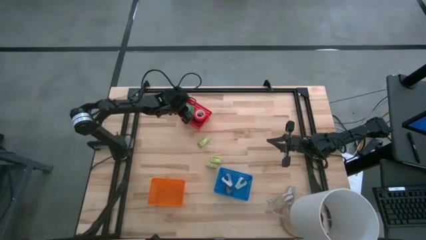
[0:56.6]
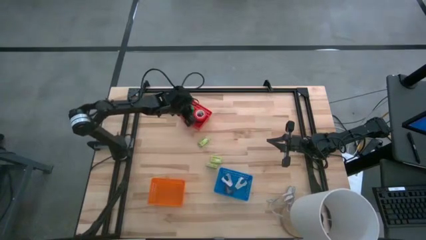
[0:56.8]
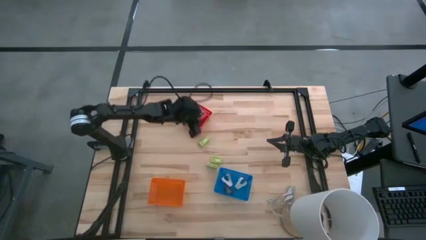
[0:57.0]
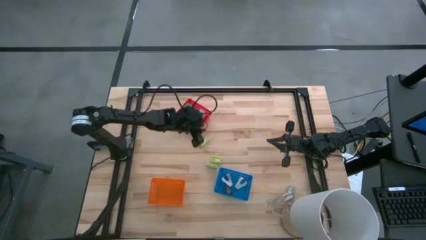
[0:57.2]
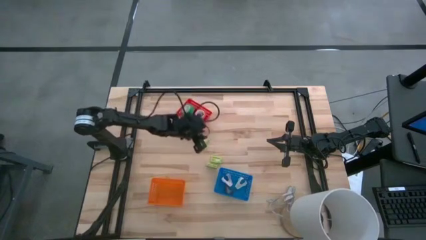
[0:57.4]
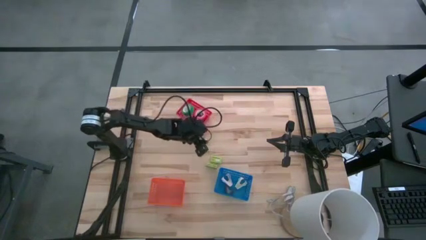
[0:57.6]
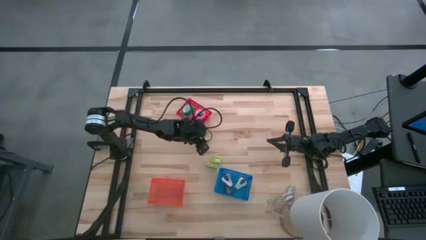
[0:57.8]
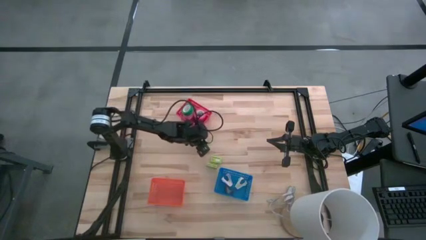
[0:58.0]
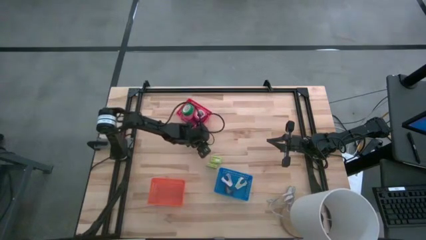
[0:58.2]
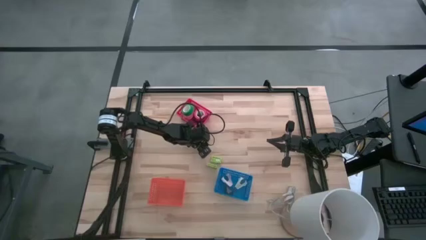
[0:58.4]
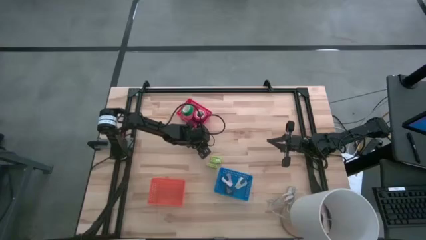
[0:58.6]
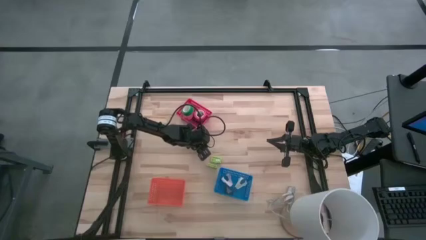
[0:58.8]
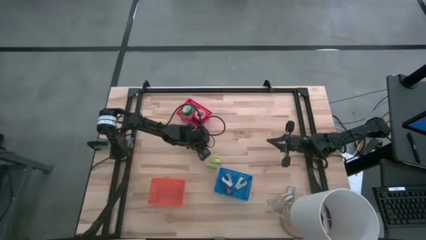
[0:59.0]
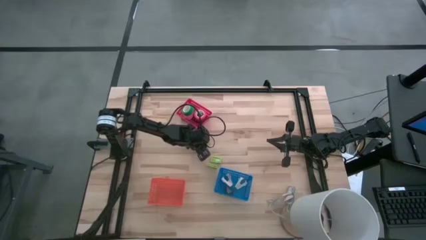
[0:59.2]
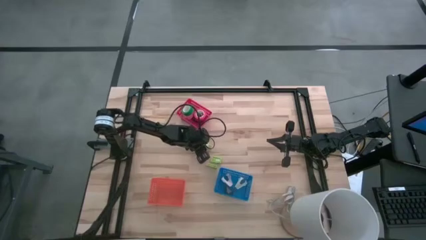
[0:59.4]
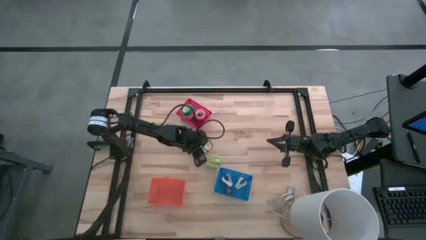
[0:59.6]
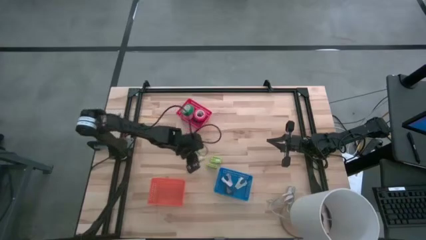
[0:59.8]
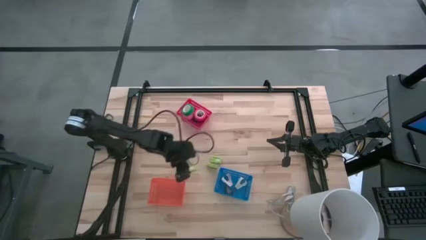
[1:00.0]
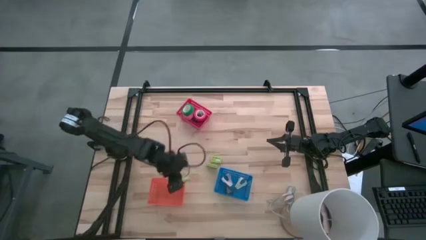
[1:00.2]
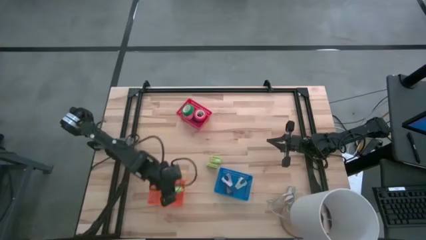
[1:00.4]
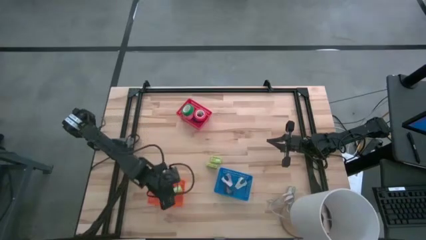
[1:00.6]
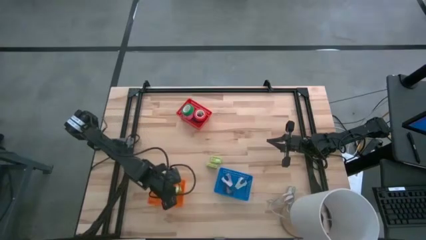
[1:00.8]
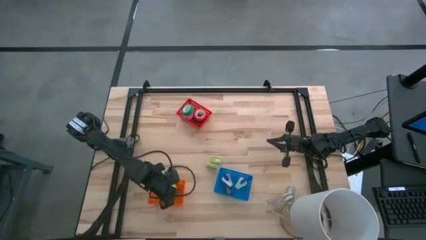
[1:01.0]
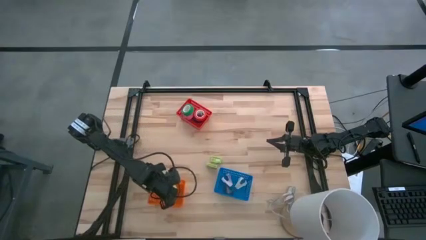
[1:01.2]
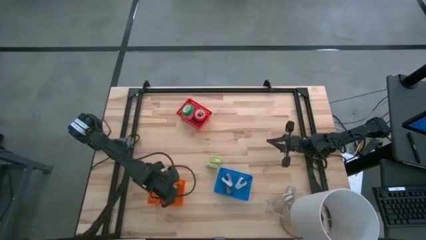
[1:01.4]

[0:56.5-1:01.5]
Task: Pick and place Stapler, Stapler remover, tape
Put the top staples box into the orange bin

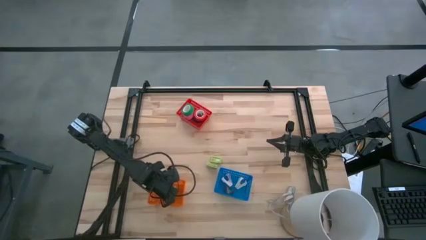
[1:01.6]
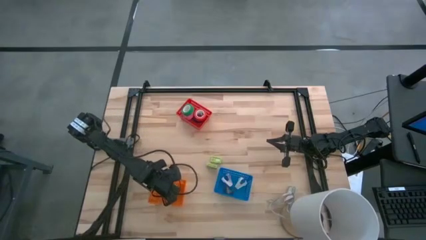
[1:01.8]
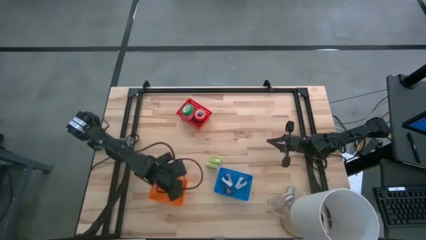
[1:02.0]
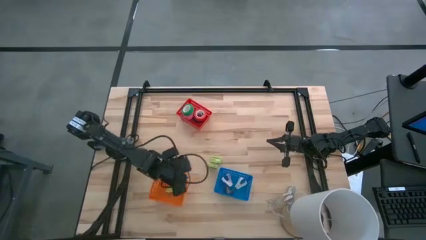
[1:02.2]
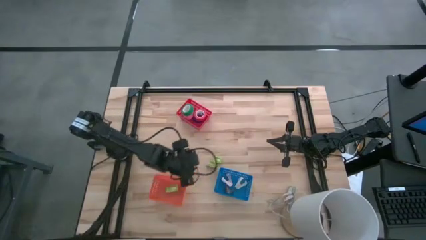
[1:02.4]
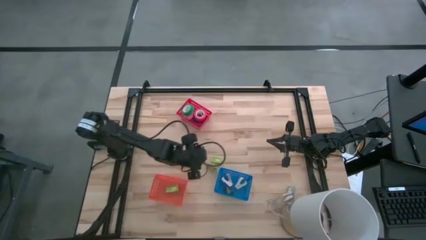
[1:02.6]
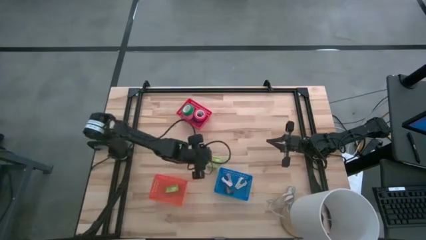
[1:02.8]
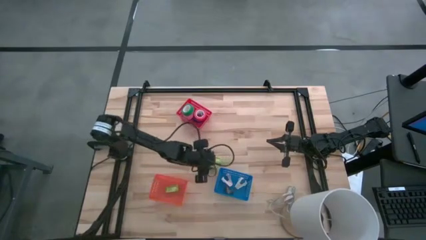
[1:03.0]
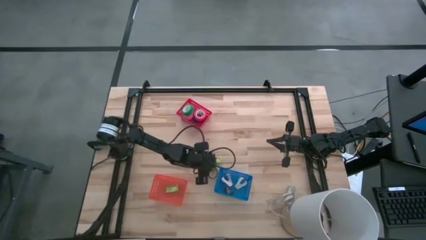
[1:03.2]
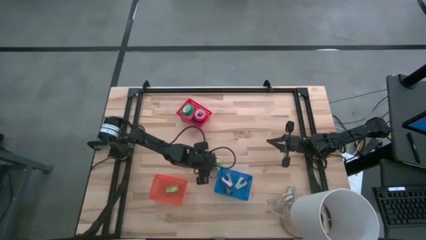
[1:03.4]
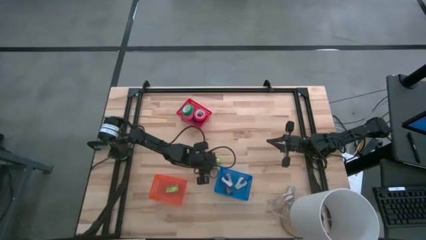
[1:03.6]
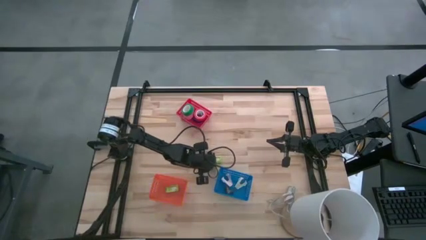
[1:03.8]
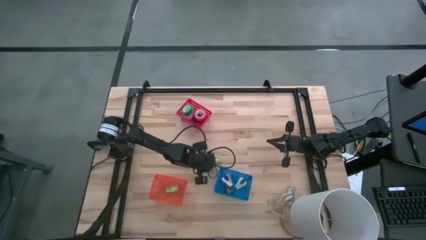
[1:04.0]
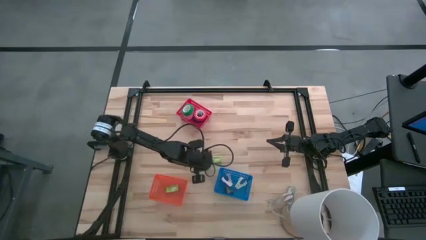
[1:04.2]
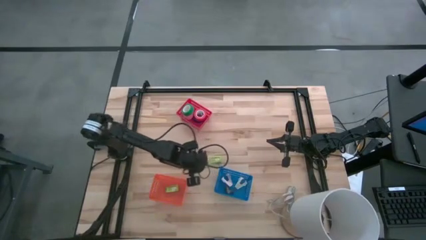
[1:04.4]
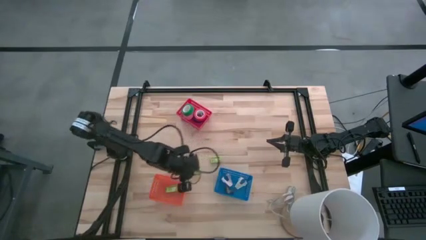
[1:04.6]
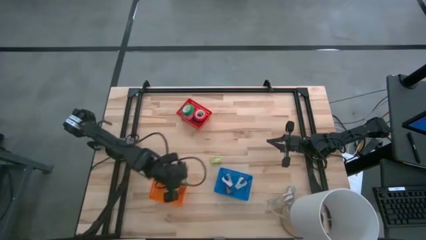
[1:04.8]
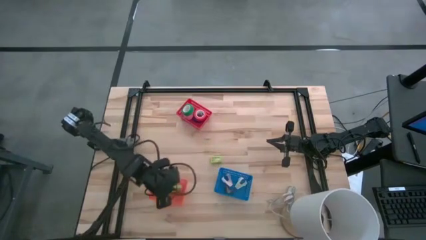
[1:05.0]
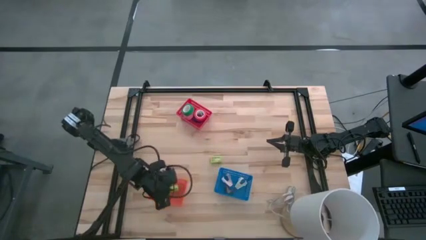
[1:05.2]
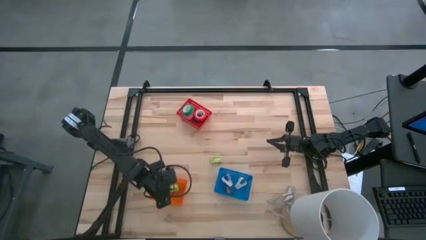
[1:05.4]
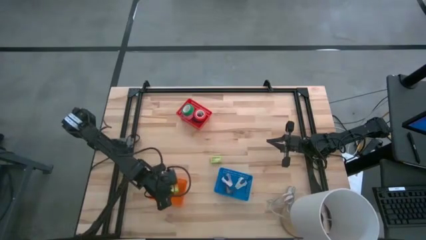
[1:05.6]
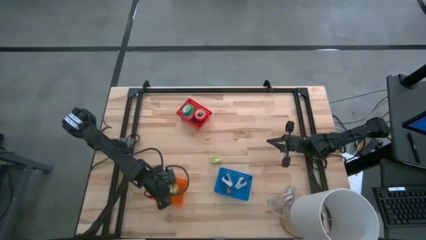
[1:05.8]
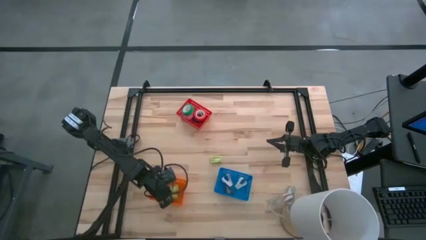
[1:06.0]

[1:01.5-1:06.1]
Put the bottom staples box into the orange bin

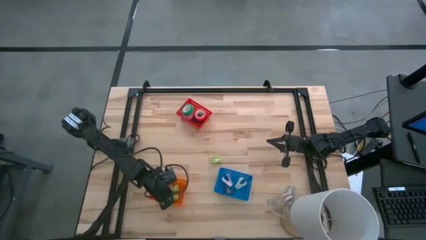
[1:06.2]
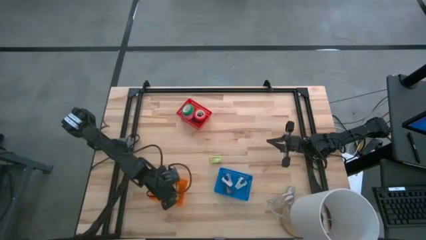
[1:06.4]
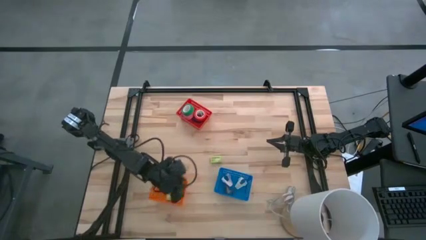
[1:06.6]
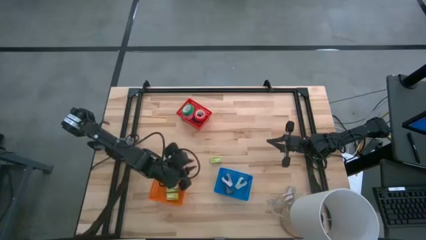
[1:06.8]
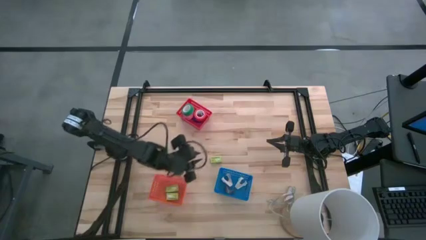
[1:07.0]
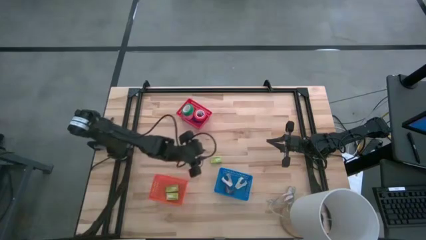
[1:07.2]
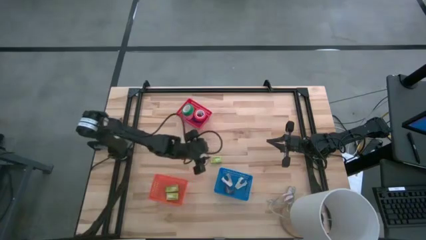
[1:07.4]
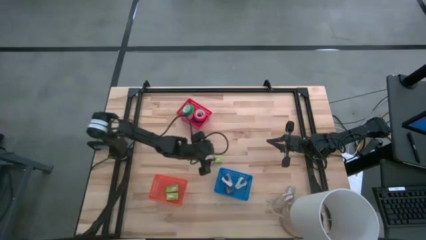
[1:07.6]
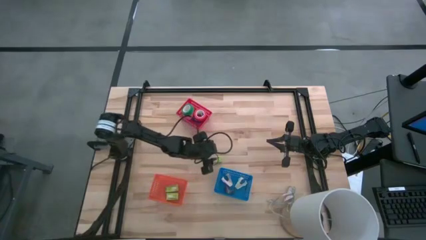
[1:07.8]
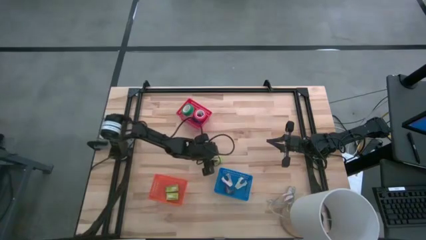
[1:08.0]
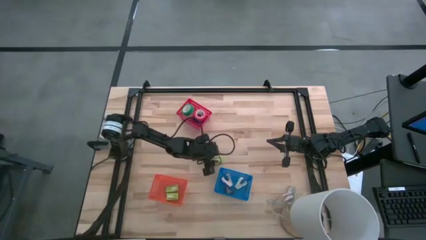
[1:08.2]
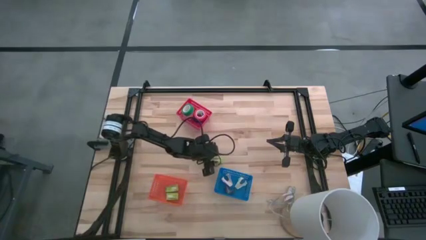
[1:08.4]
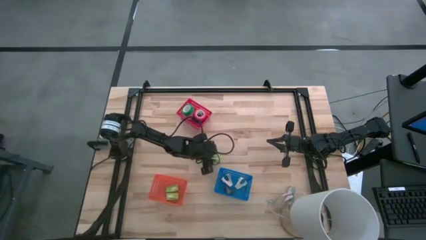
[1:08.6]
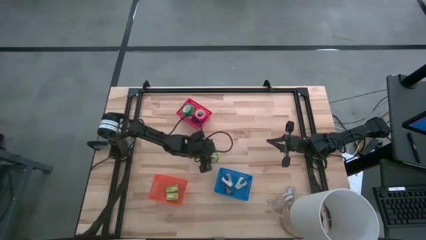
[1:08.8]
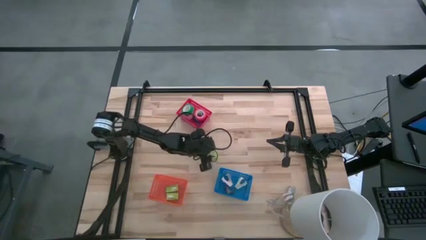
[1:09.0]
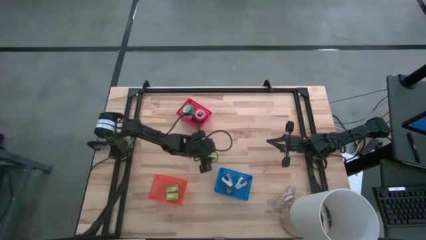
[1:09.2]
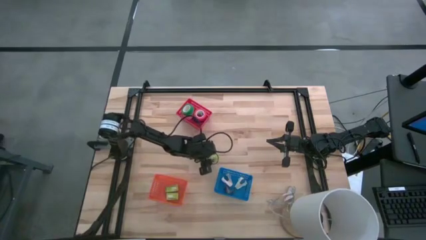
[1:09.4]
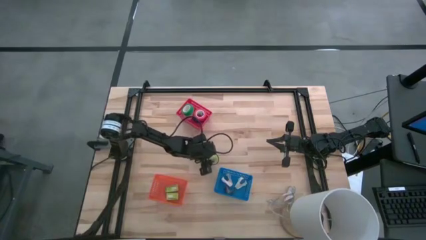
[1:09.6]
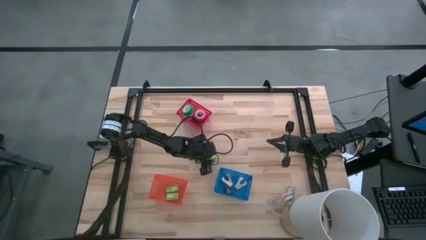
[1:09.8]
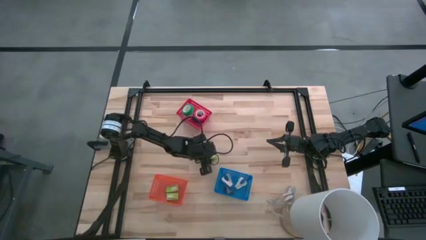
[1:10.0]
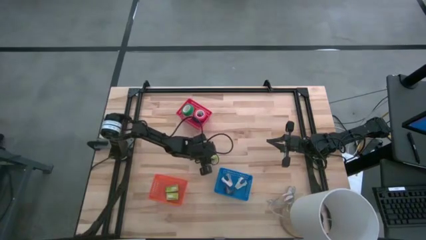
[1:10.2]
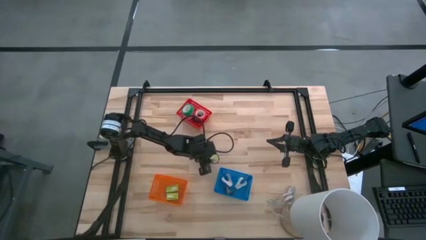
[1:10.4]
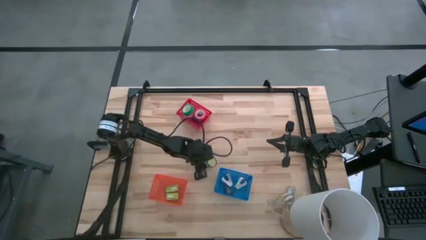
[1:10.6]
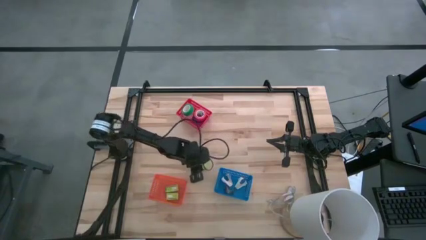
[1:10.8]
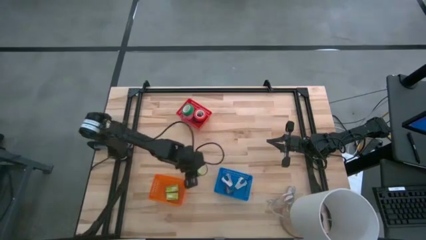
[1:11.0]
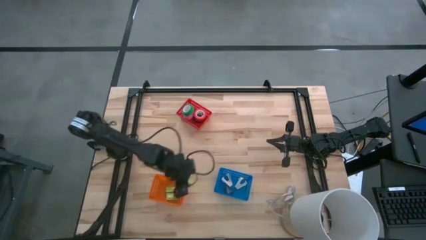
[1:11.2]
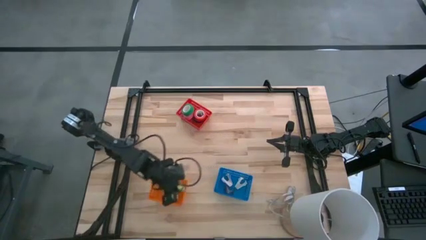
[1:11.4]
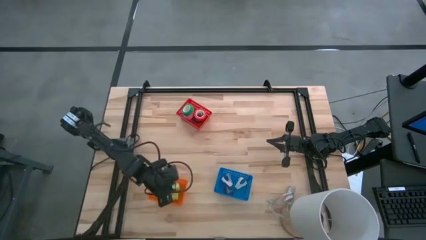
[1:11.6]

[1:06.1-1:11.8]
Put the staples box into the orange bin
